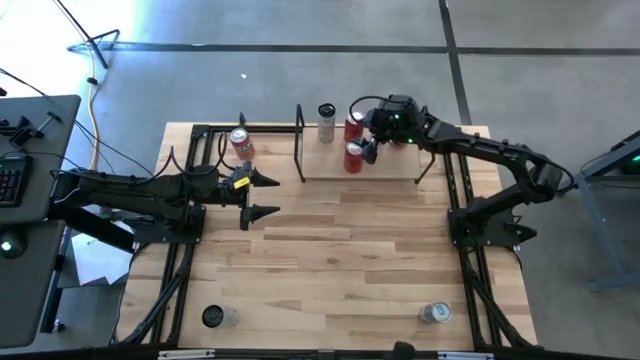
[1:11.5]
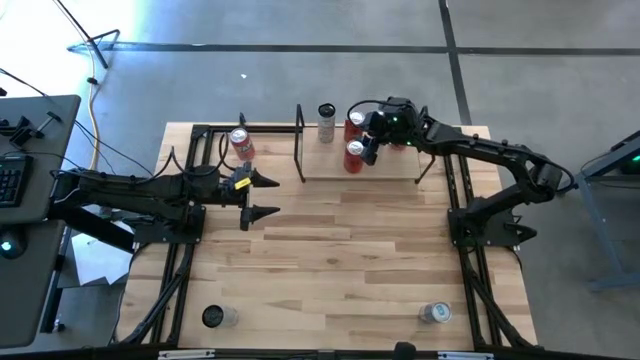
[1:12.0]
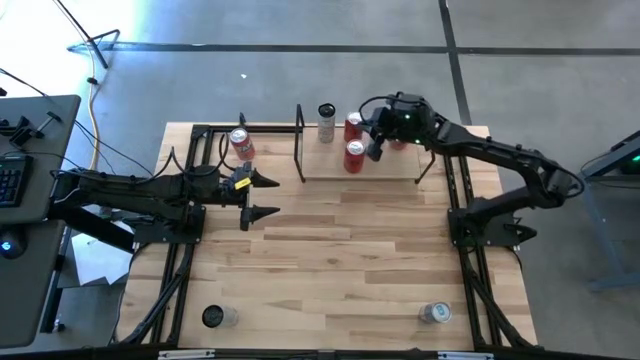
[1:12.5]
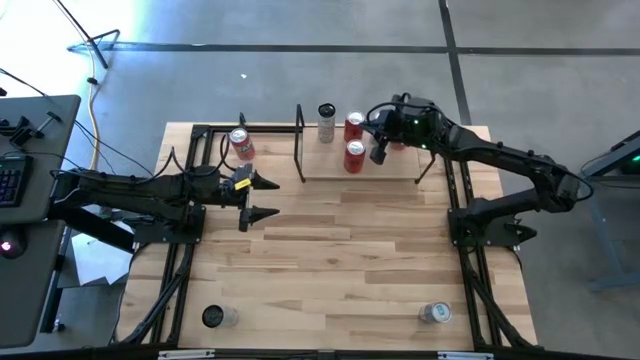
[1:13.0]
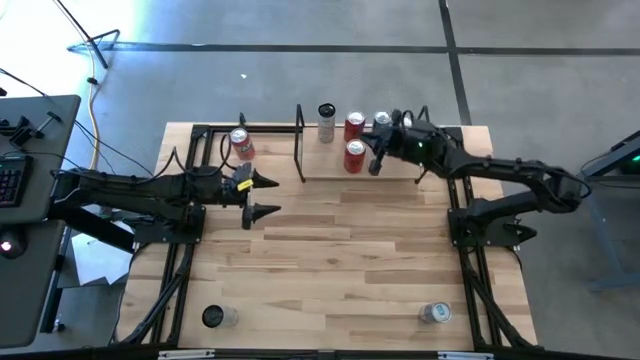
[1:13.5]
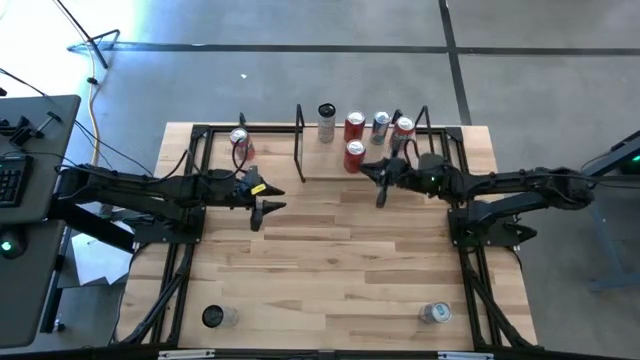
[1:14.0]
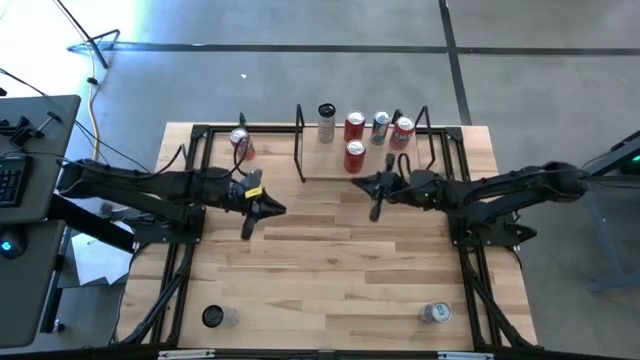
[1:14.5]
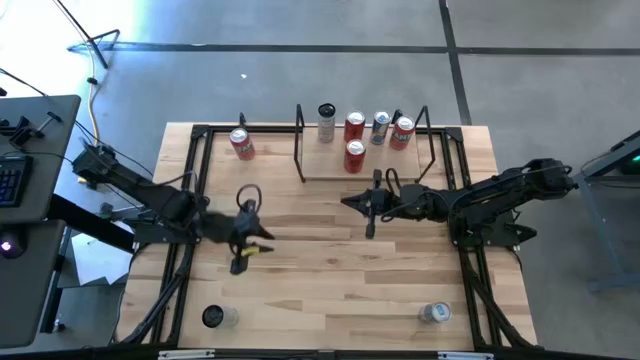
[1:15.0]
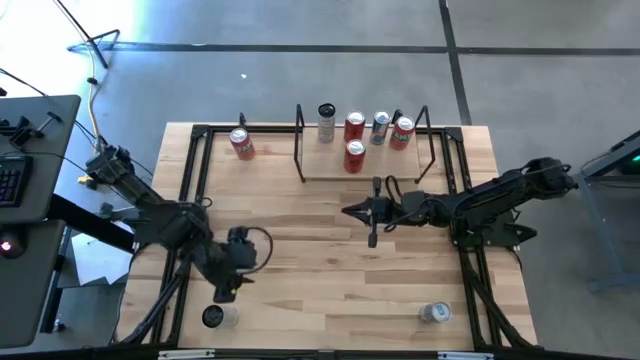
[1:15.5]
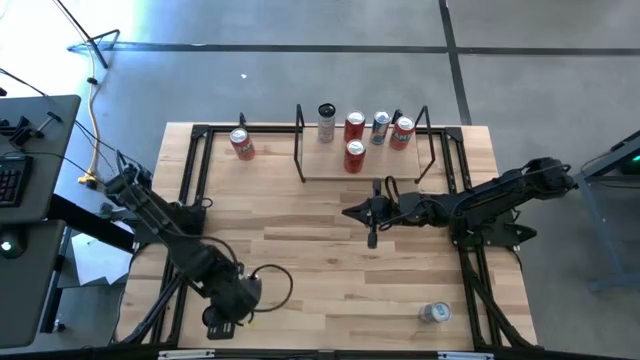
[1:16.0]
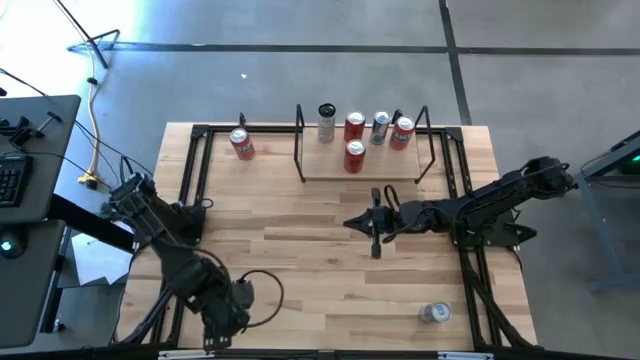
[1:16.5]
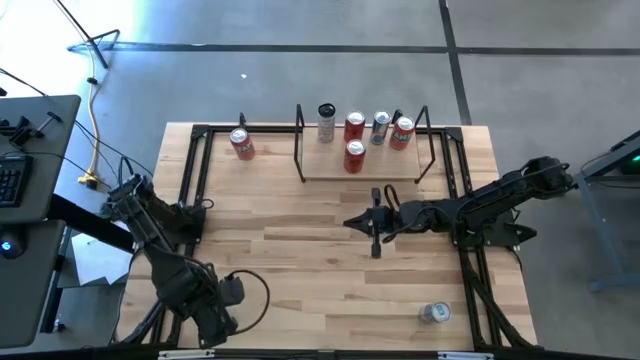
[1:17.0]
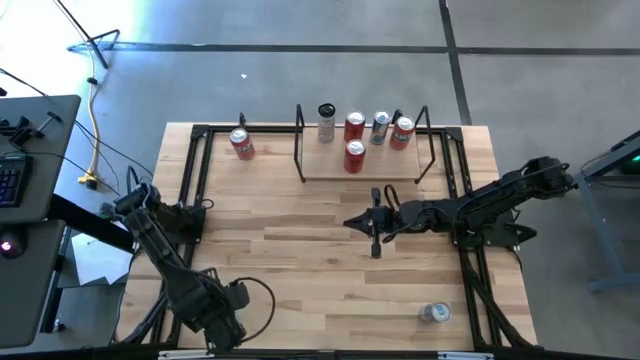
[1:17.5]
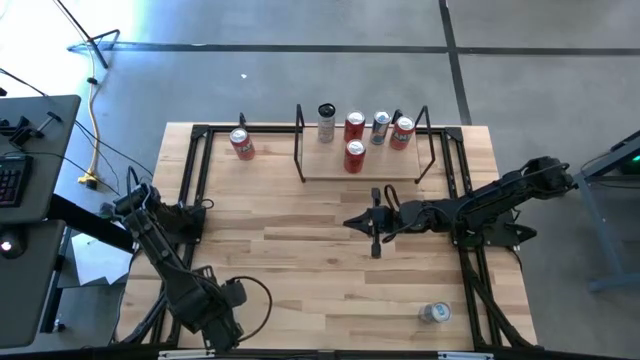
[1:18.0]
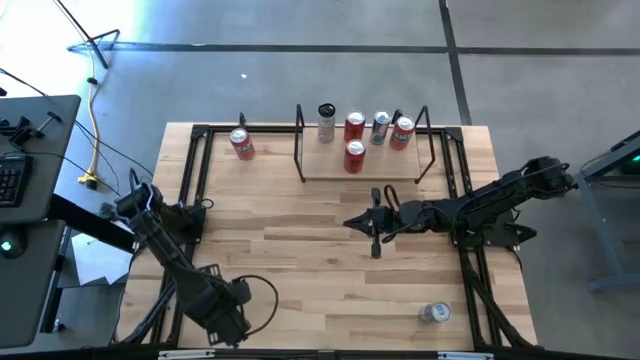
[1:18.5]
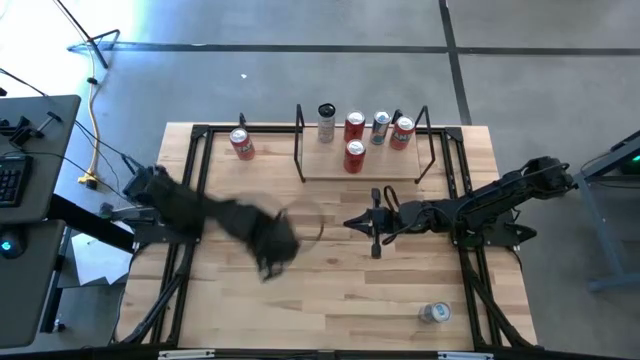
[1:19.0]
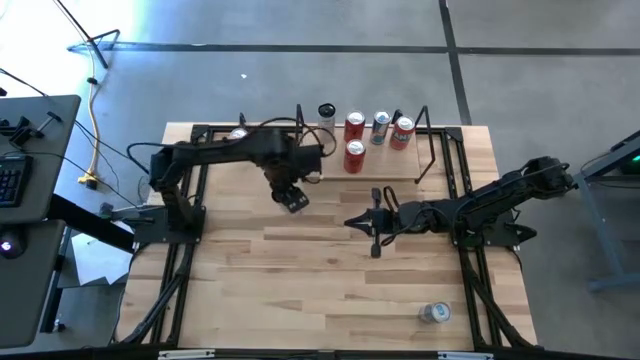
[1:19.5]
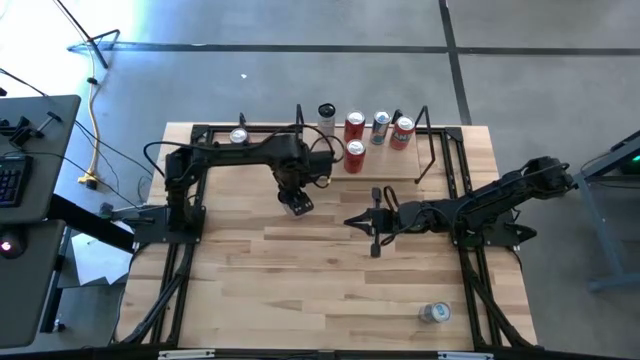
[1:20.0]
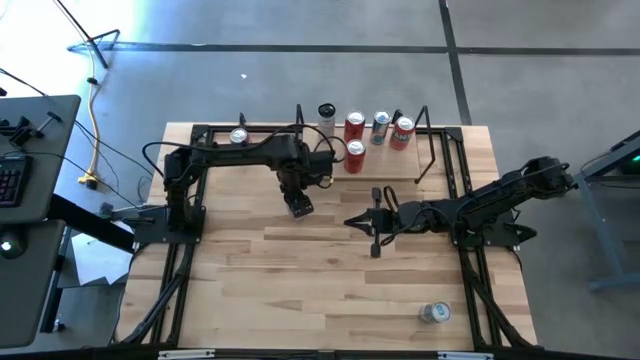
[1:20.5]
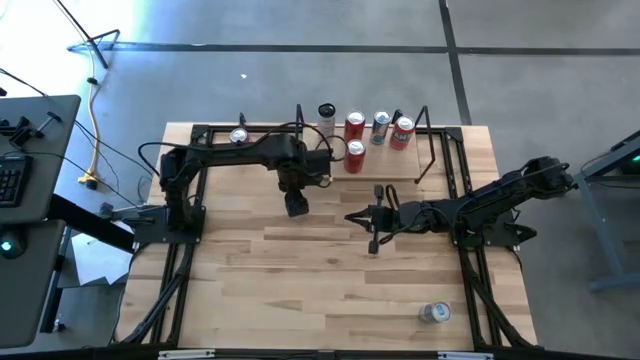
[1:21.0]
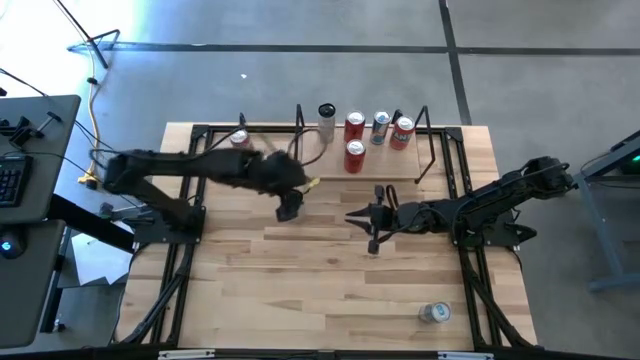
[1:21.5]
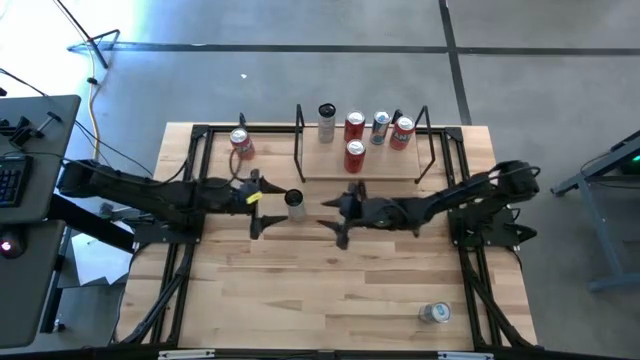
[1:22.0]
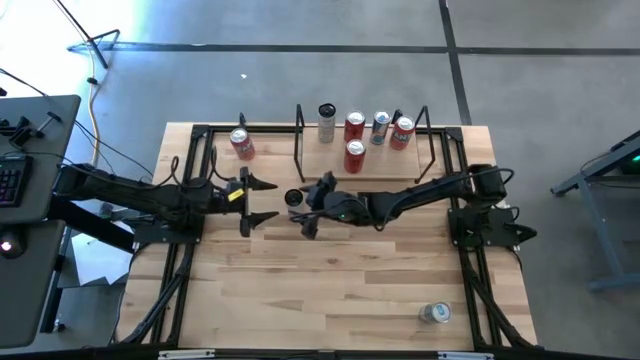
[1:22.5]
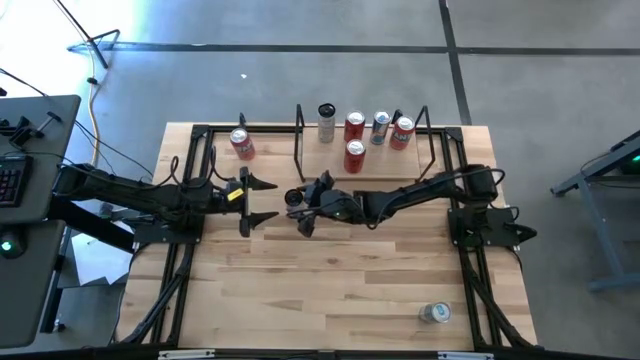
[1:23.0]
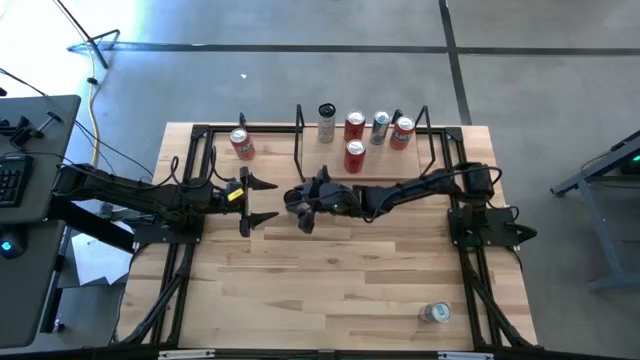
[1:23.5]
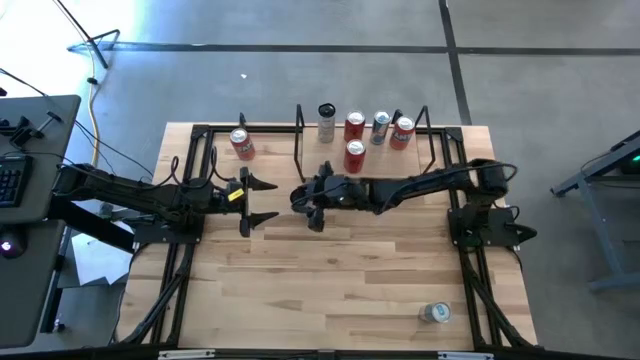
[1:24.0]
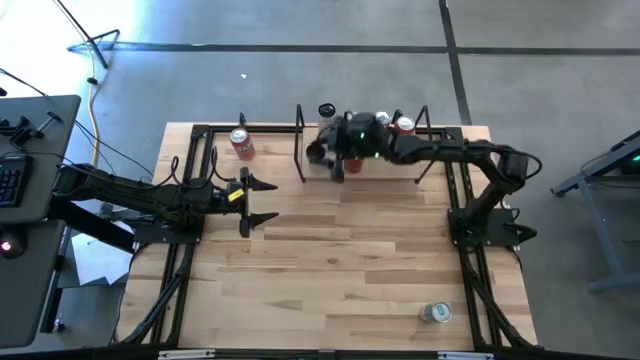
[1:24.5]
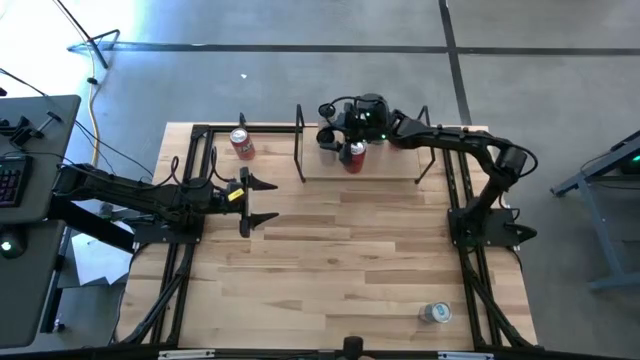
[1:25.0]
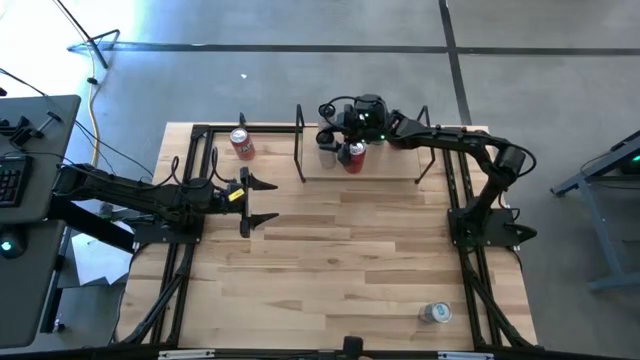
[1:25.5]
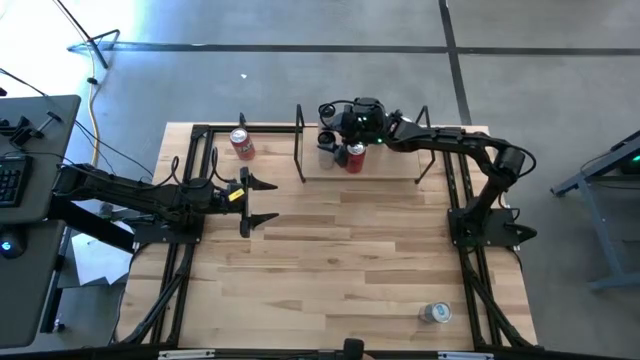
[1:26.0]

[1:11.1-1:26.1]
Task: Place canned beverage on shelf
Put the white-yellow soda can aligned with the white-yellow soda can on the shelf

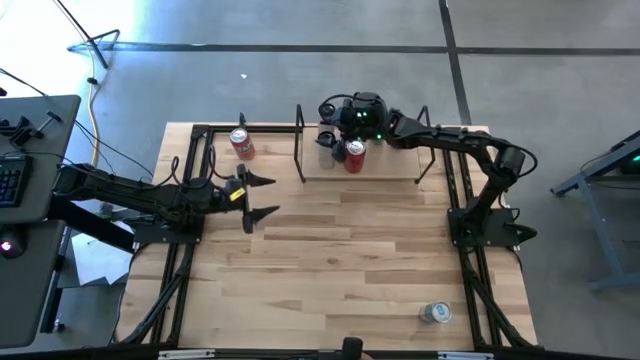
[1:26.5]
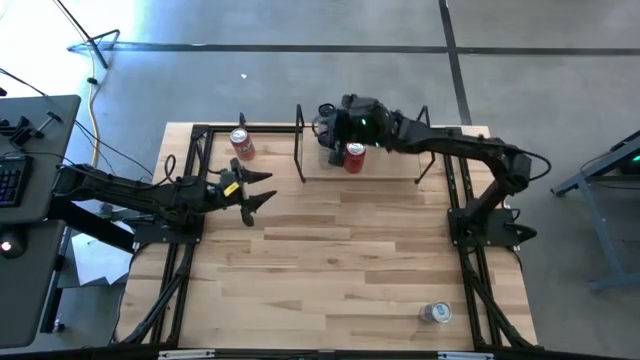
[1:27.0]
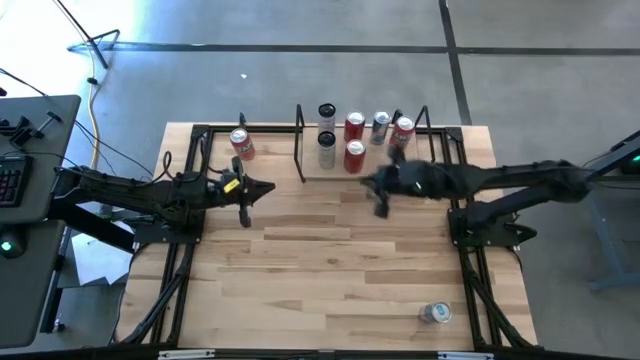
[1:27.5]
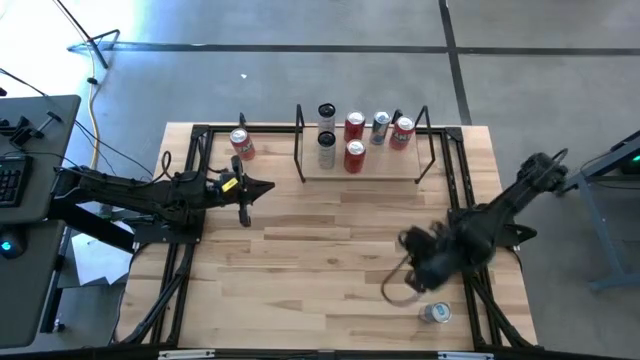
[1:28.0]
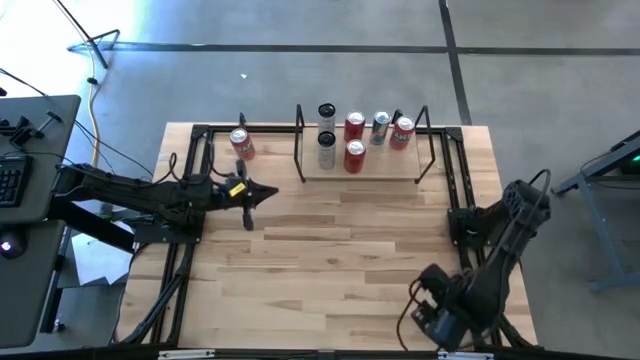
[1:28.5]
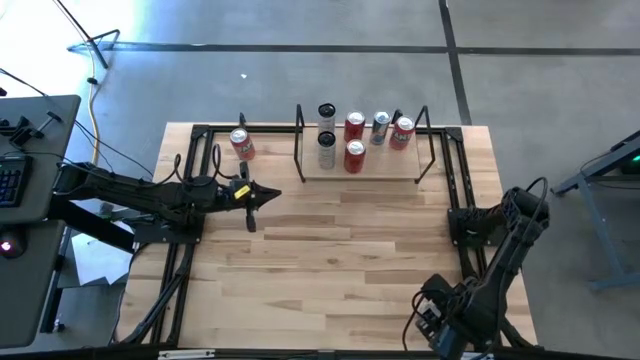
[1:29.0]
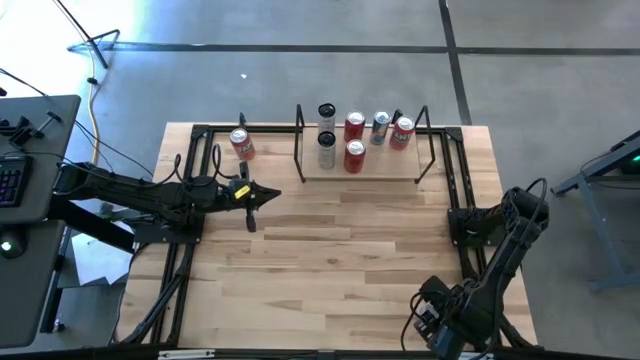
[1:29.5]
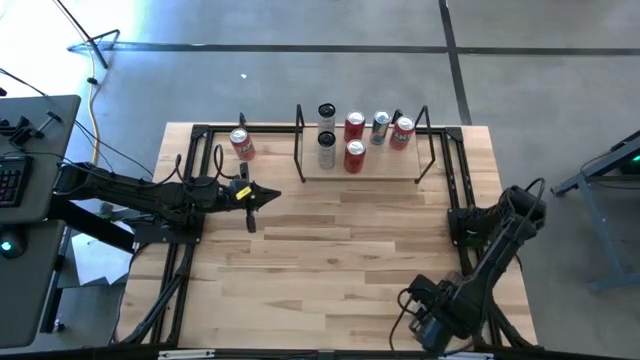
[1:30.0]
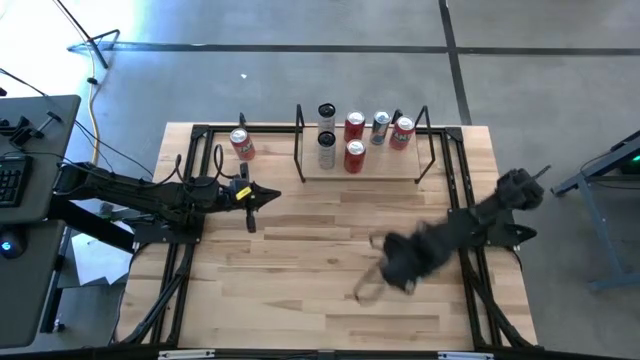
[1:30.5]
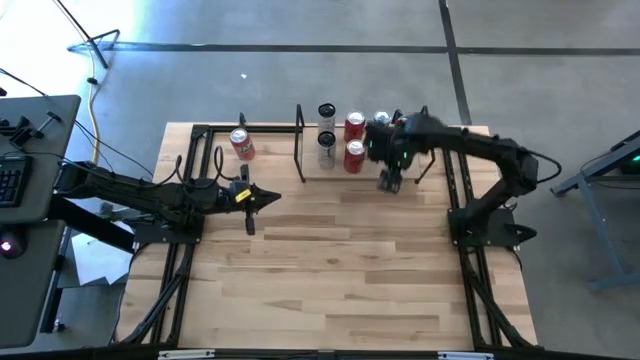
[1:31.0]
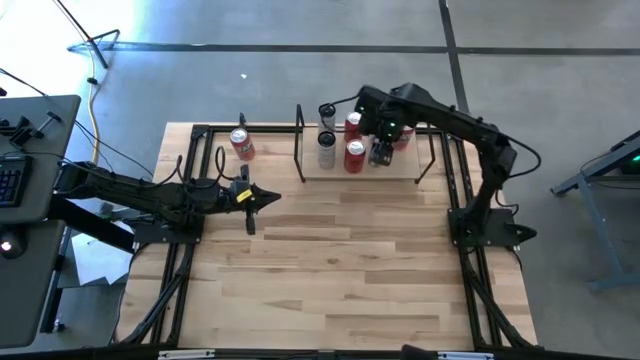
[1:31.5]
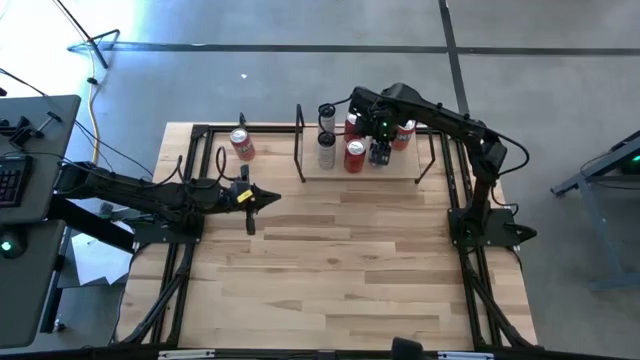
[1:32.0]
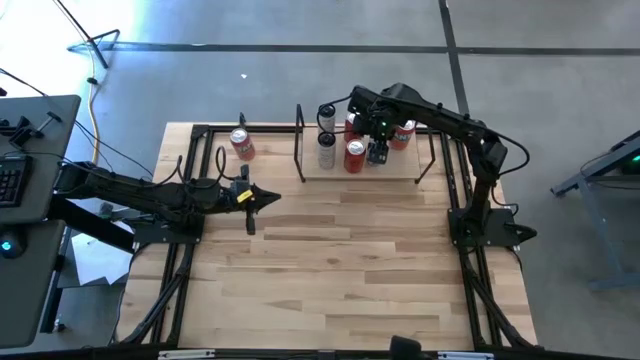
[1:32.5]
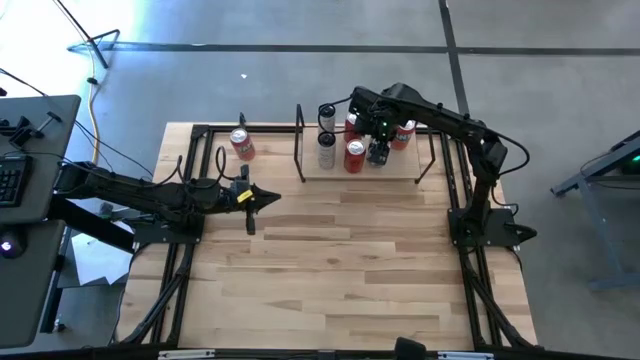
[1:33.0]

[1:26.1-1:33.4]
Put the blue soda can aligned with the other blue soda can on the shelf

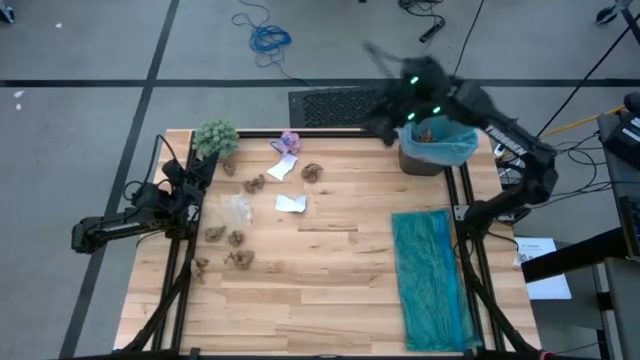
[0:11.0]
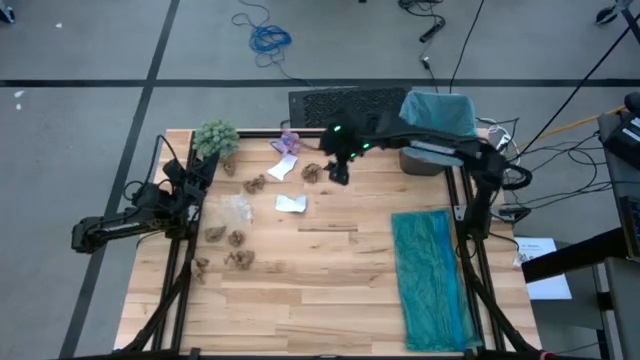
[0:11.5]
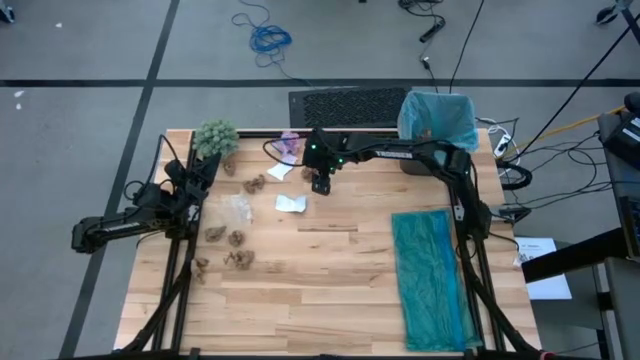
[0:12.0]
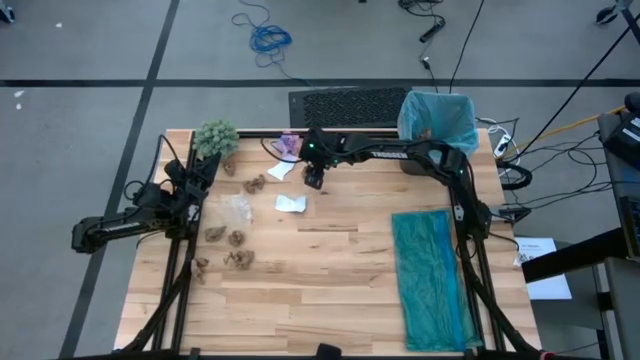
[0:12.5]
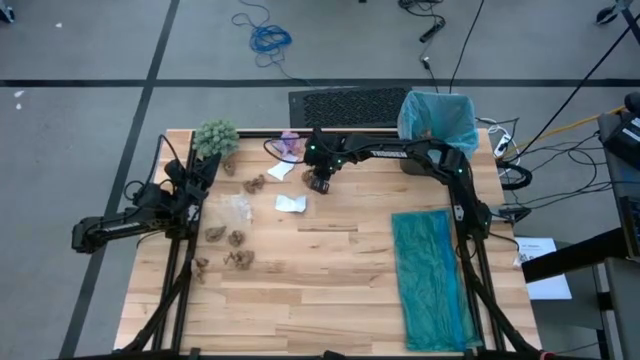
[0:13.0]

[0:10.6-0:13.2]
Task: place trash/remove bag and relplace
Put the brown paper into the trash bin
